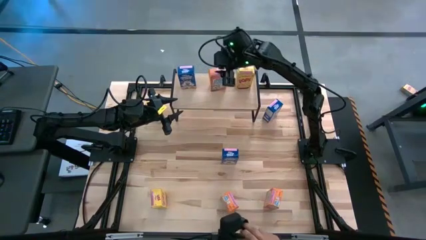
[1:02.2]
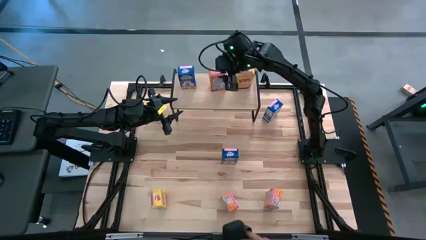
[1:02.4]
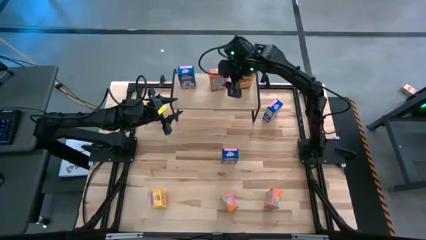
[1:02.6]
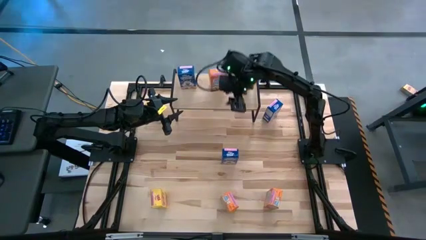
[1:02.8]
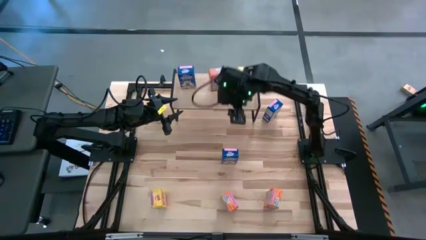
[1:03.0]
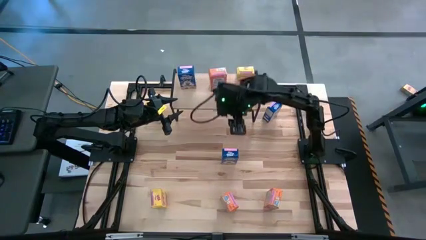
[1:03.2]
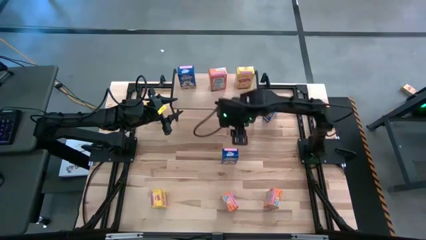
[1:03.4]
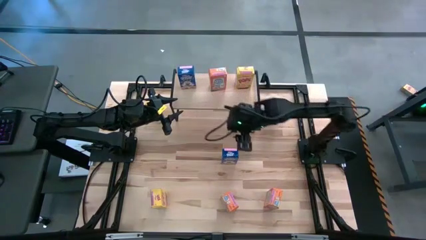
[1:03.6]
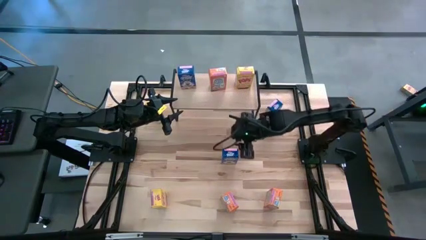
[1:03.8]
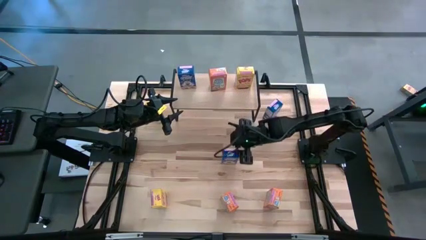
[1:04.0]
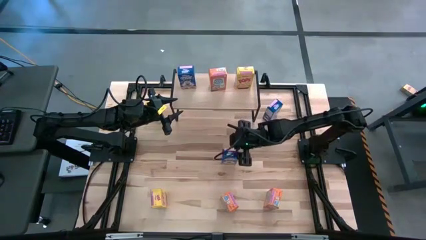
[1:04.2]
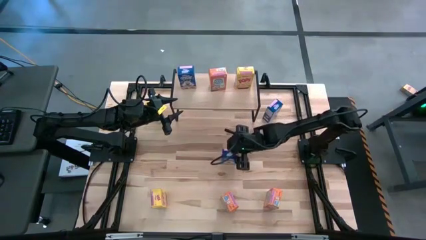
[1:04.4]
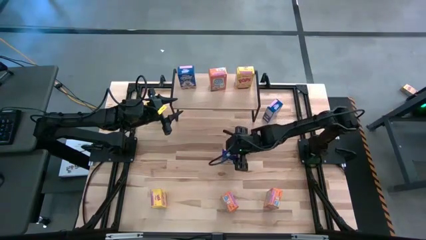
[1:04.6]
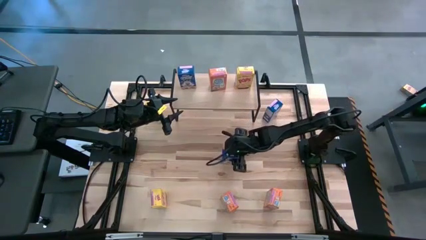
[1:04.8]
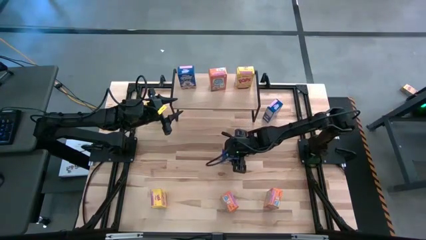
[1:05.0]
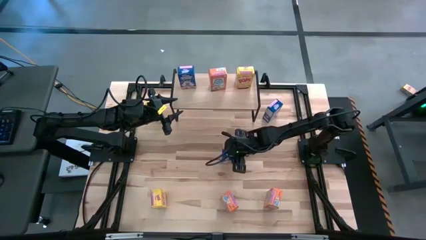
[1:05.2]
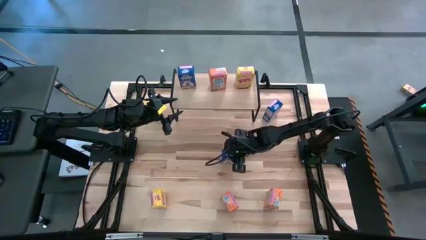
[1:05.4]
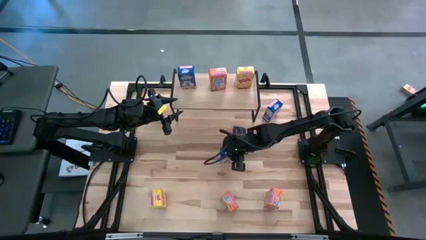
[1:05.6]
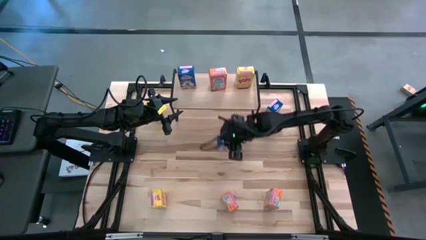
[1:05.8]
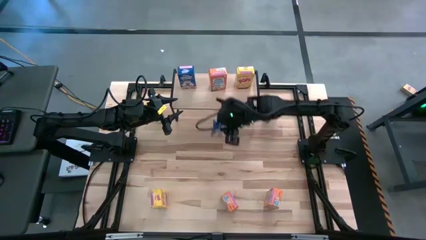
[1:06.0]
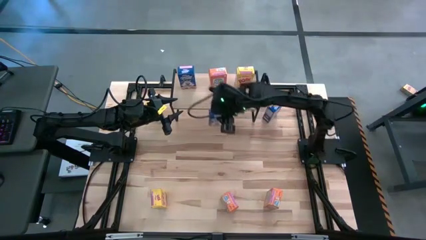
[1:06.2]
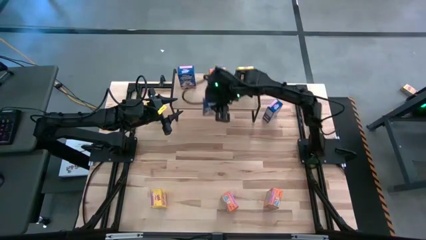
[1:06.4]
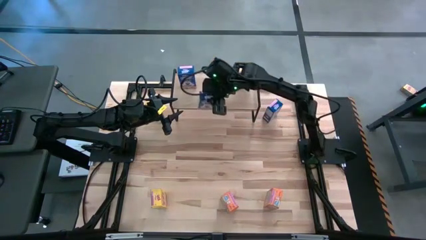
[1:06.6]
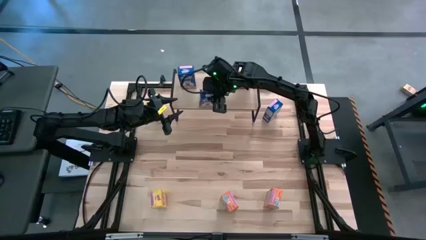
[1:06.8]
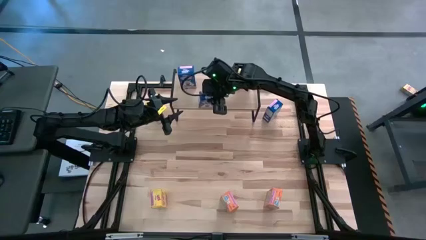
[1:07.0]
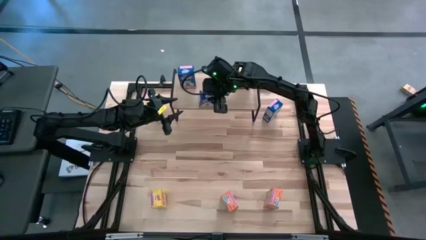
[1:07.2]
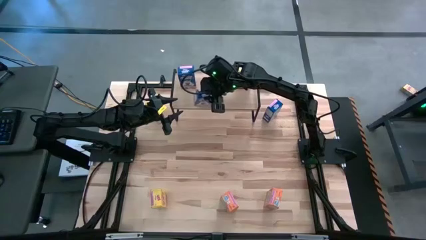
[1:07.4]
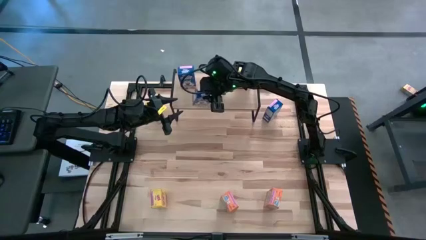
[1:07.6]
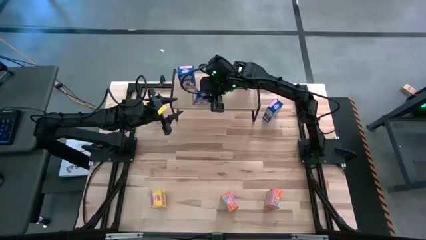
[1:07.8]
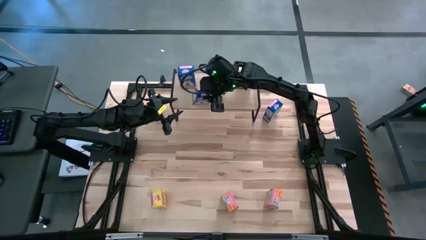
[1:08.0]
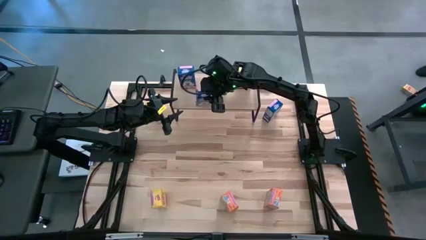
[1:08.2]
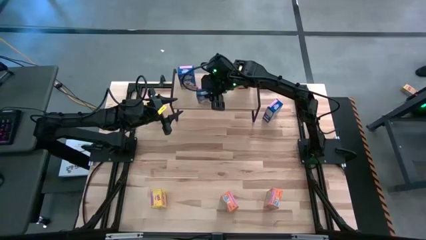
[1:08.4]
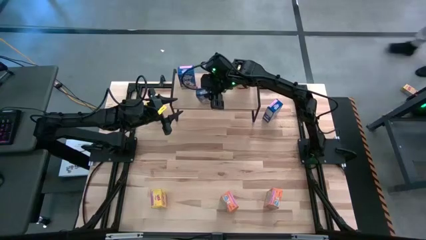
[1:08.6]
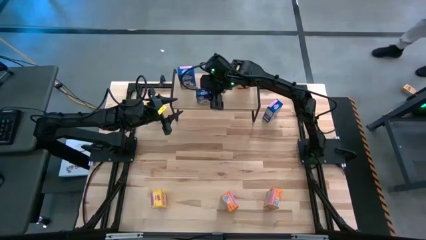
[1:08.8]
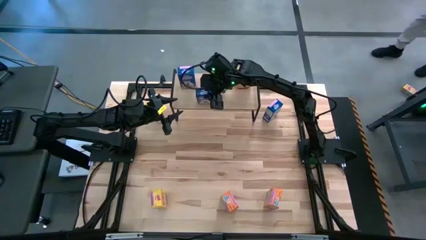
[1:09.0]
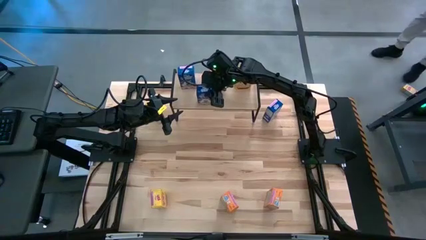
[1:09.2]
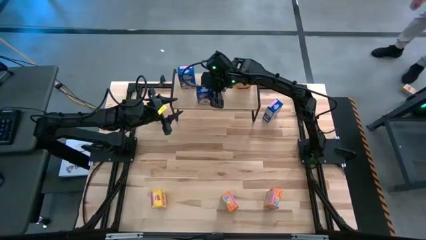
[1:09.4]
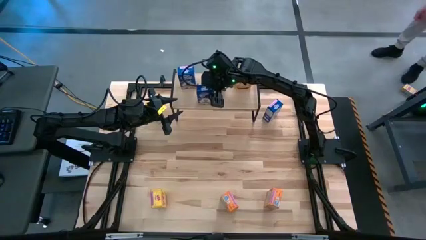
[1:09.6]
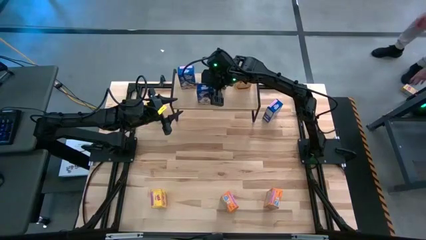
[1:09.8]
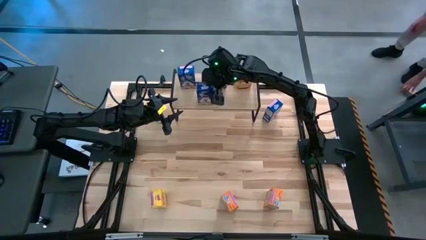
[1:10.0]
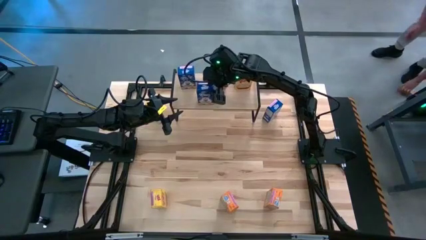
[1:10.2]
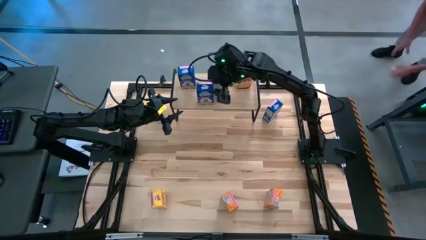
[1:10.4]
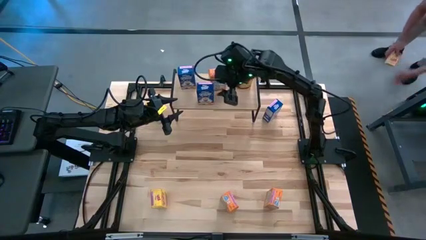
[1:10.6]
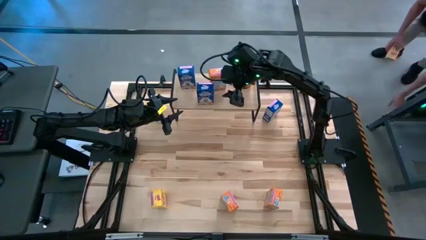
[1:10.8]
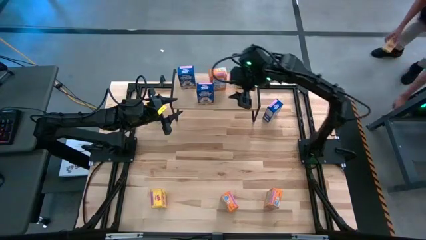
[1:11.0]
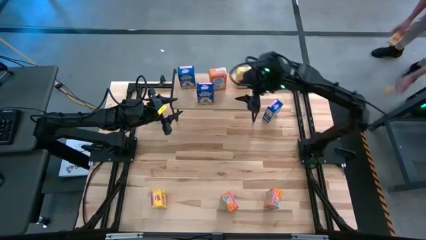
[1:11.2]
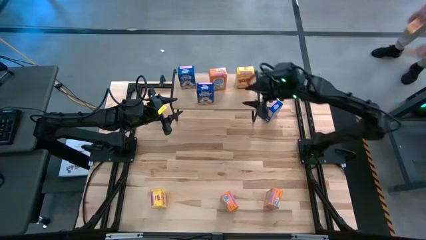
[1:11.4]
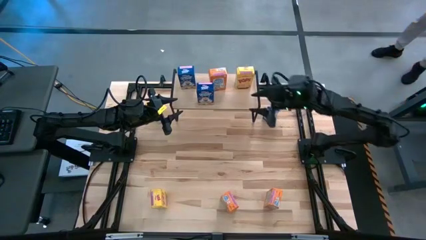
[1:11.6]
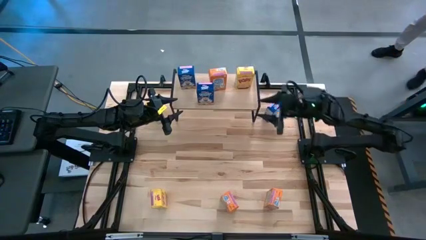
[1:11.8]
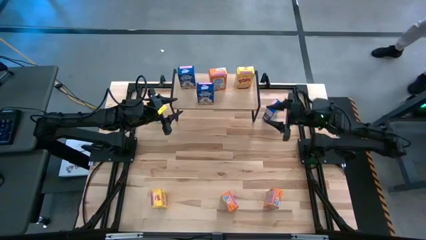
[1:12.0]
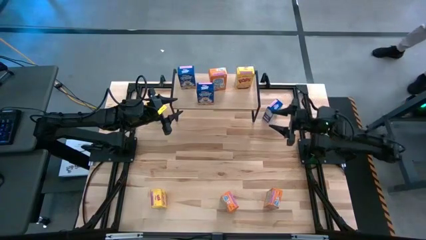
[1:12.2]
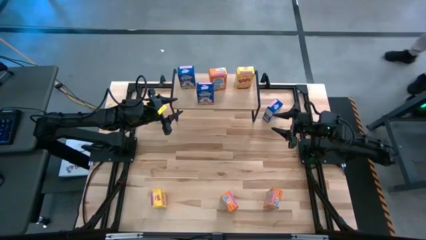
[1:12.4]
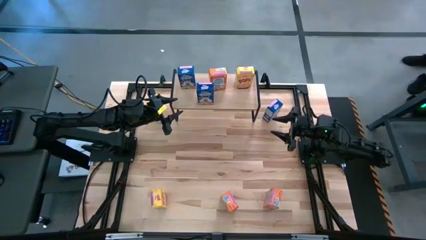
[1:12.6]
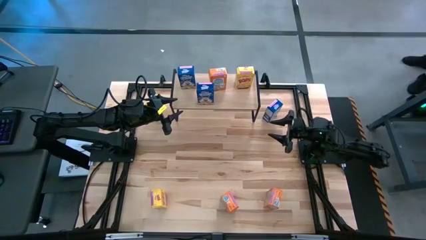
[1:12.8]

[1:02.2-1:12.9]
Task: Stack cereal on shelf
Put the bottom blue cereal box aligned with the other blue cereal box on the shelf
